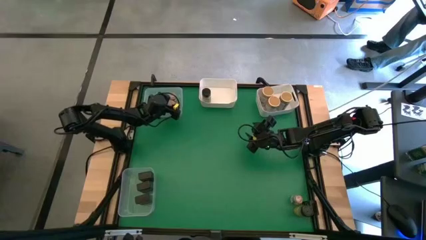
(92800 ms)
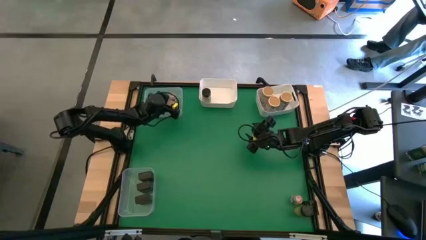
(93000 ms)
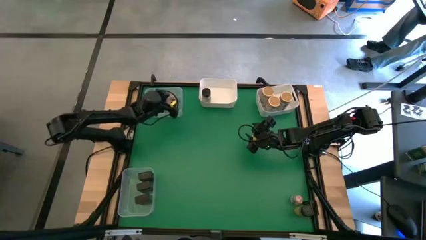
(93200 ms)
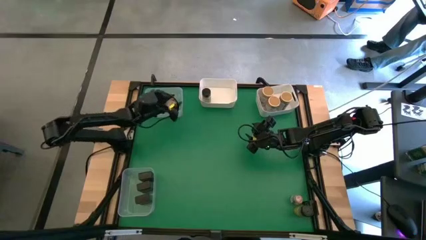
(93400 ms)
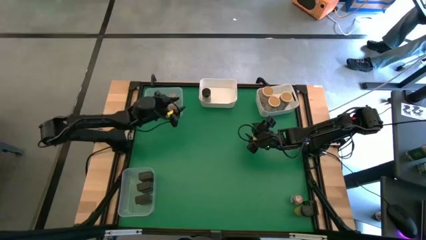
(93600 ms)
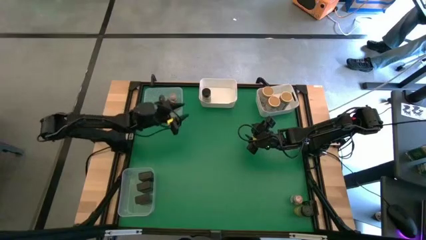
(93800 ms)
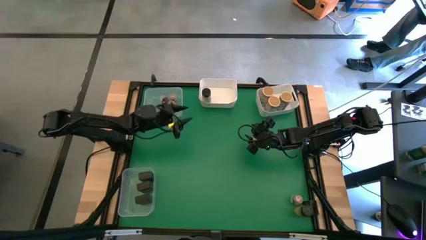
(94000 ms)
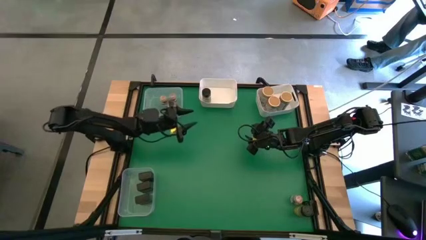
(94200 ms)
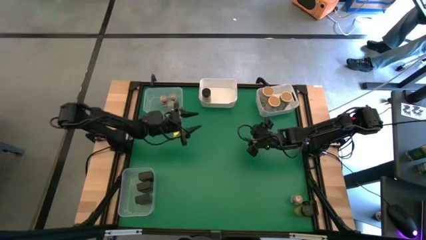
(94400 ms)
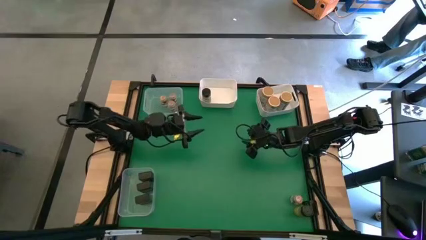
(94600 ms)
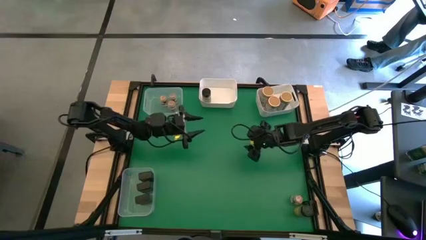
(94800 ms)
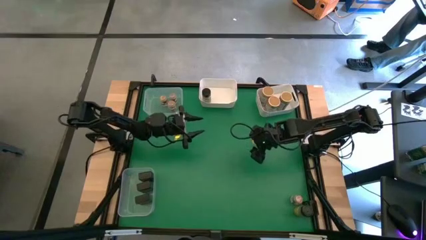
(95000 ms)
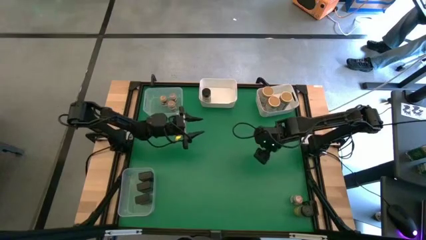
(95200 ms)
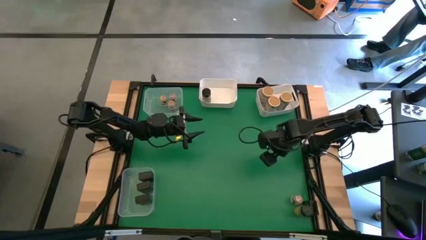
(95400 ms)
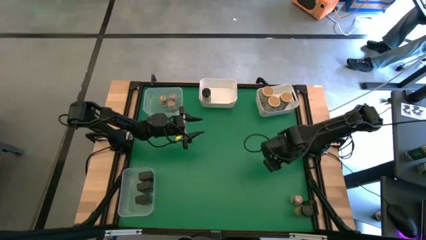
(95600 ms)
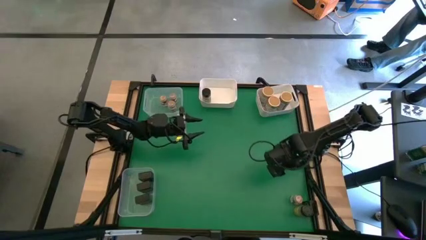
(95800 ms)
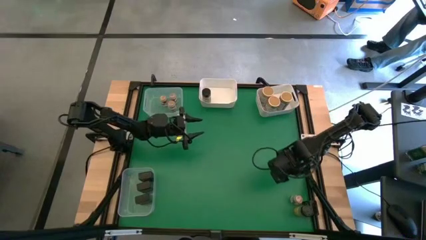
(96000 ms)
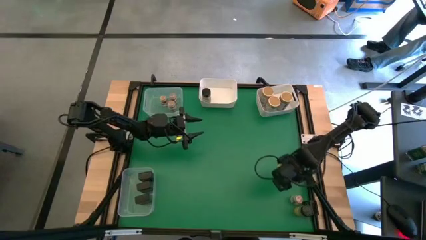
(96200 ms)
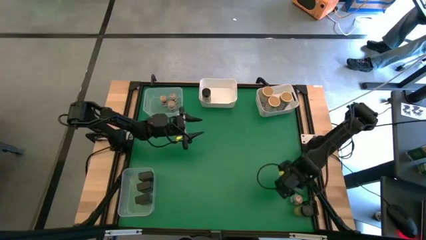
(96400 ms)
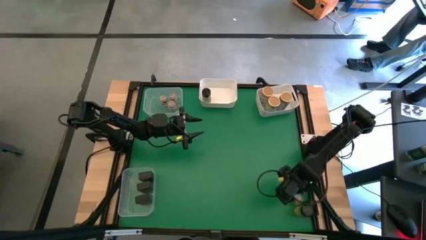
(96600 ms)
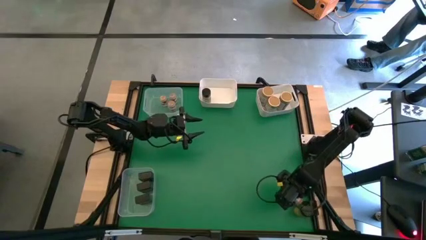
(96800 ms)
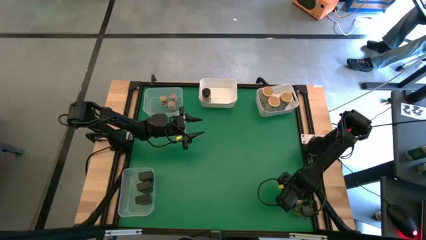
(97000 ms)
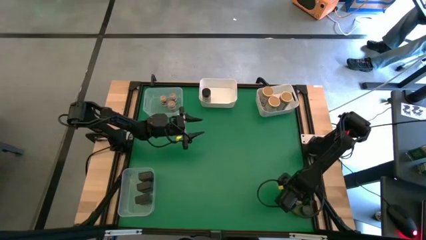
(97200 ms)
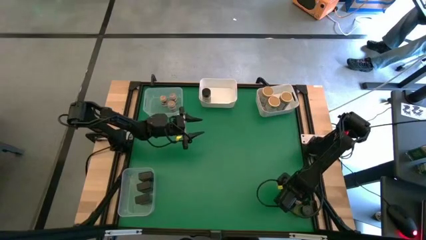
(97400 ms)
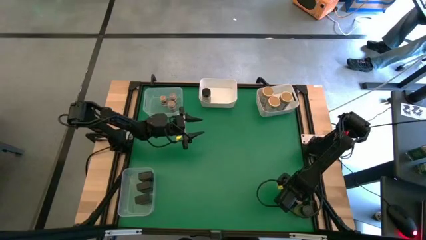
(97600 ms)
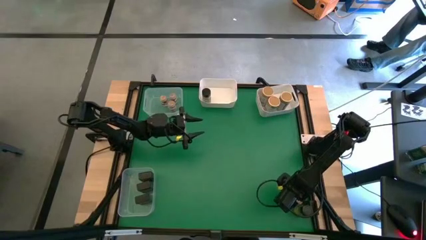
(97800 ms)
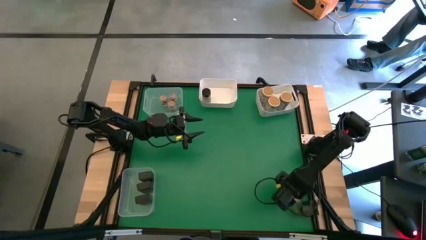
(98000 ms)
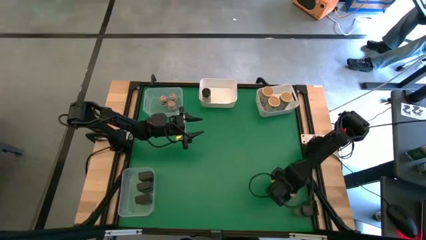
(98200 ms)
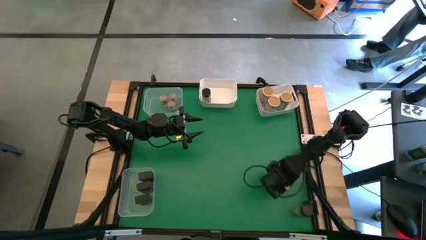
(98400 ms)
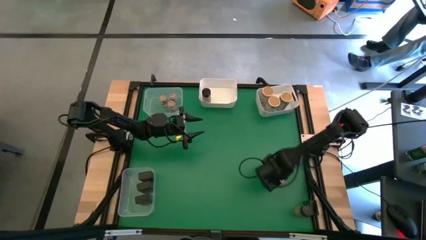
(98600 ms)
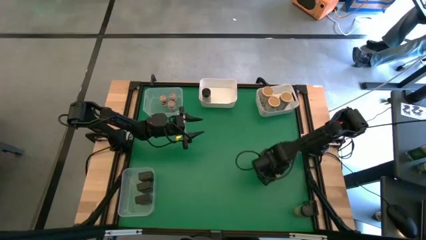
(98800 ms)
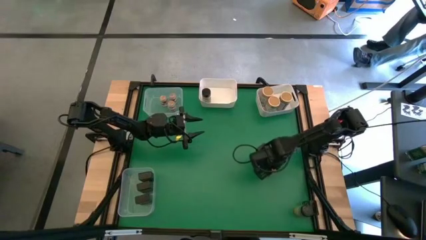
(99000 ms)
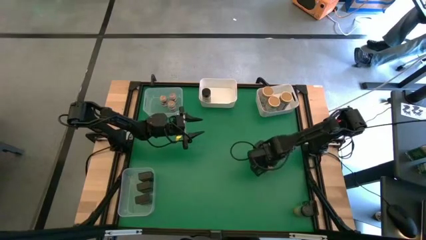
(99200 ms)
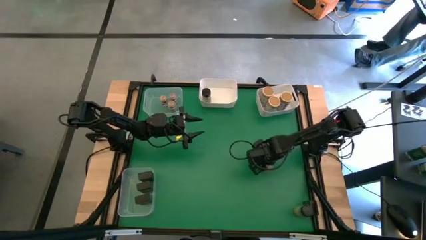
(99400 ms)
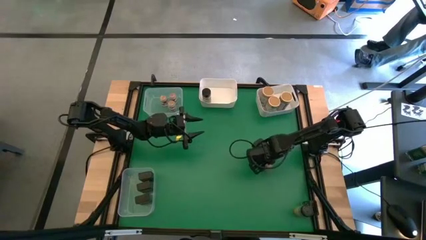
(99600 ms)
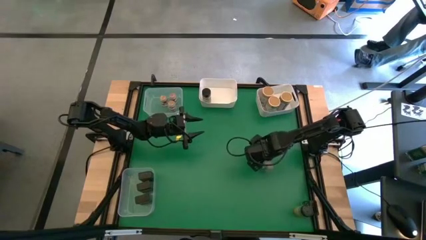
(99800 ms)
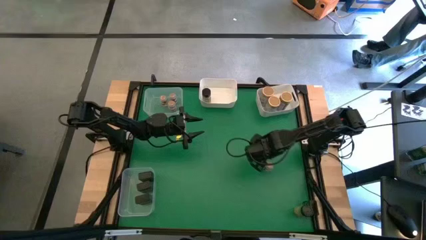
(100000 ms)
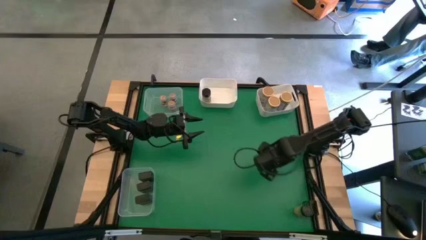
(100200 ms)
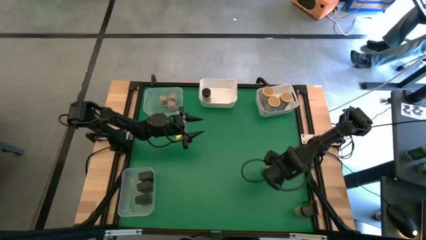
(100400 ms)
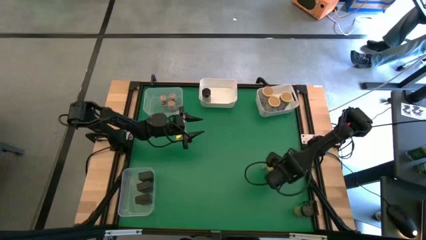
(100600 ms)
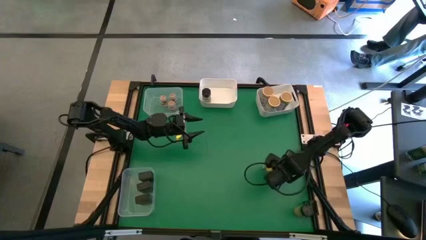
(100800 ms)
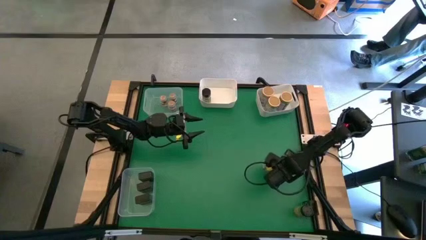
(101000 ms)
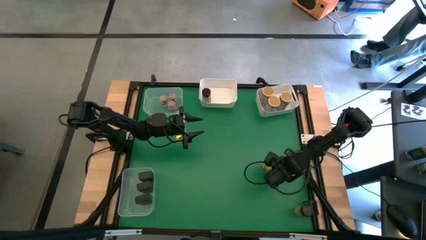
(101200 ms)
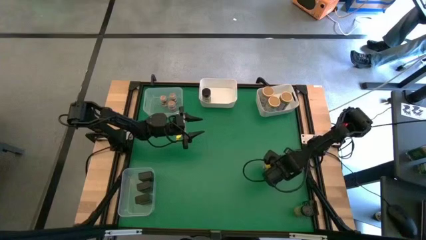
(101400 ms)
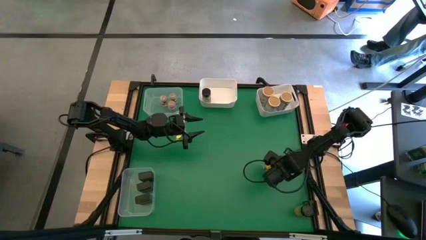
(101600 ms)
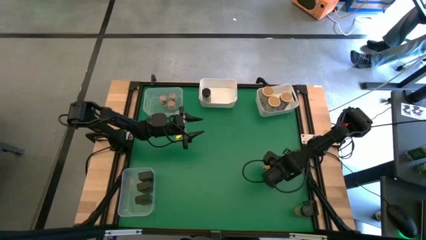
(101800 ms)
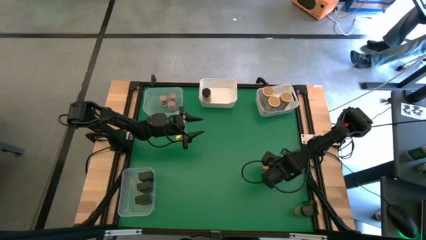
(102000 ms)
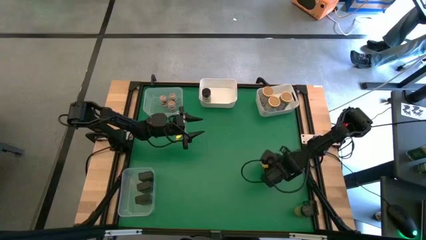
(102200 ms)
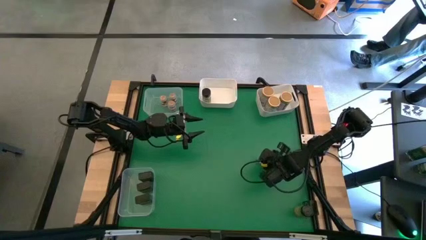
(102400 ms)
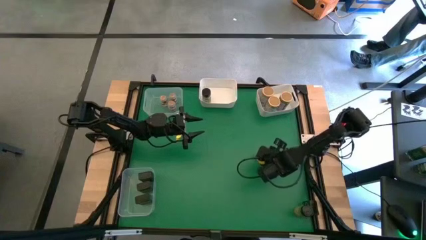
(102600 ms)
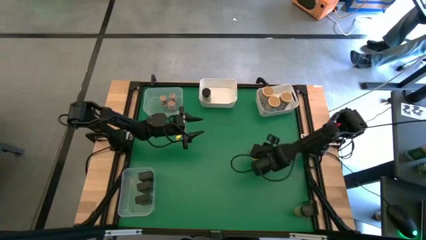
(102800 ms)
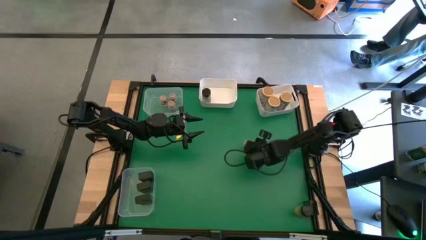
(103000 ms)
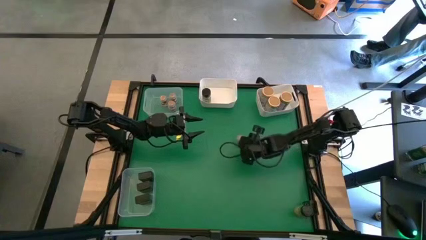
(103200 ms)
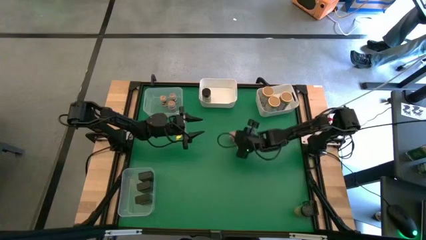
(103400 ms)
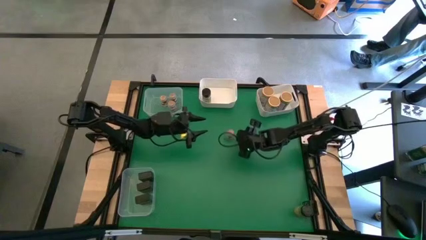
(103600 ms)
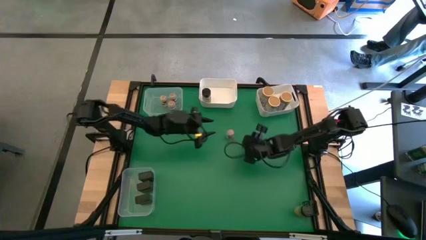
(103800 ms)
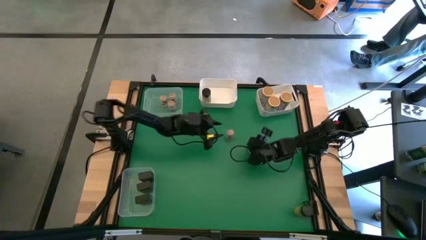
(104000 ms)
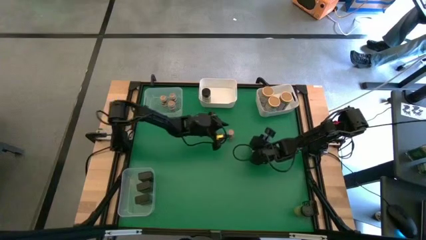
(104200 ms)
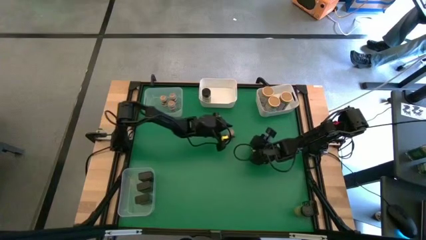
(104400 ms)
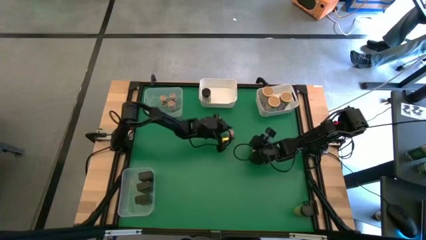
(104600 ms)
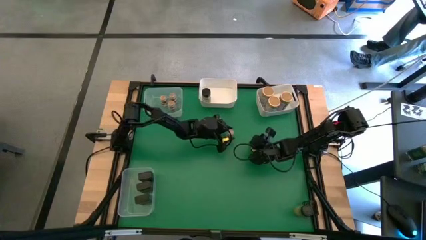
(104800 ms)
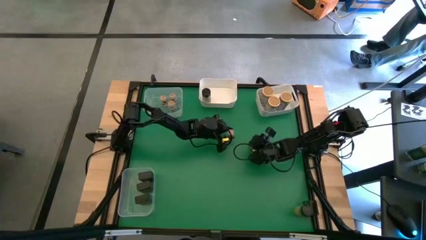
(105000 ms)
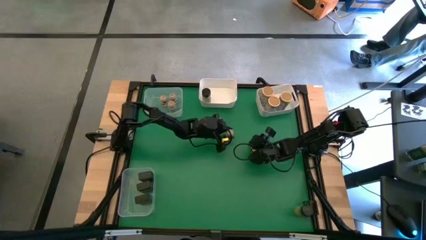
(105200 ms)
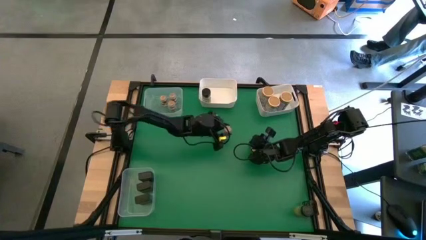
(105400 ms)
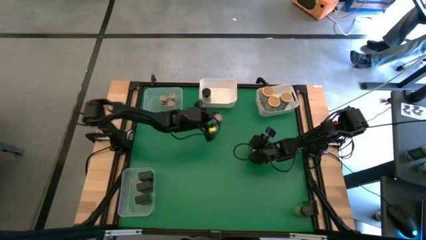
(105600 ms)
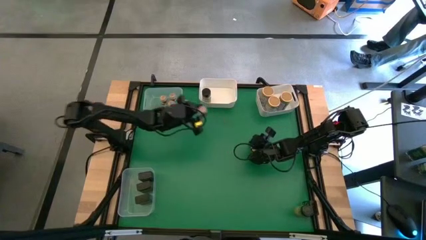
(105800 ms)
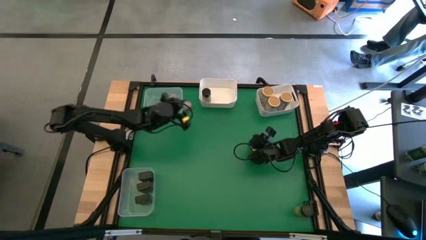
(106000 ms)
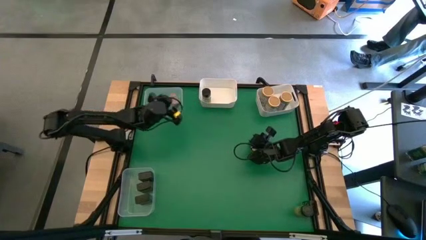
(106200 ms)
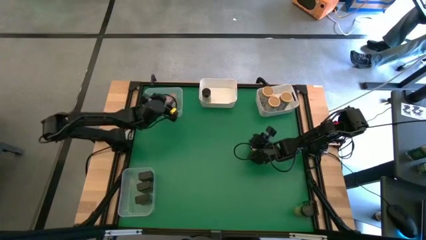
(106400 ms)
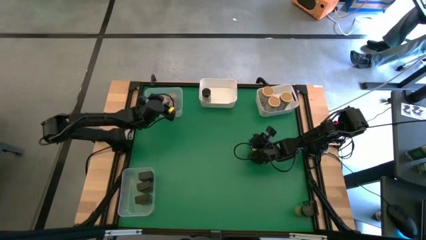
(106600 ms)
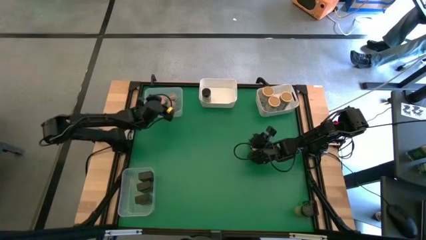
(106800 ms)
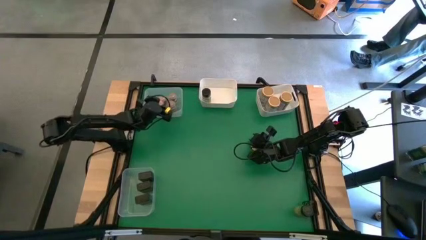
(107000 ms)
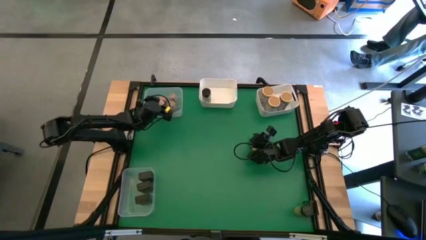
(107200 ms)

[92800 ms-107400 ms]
Task: Sort spices by type
Put the small brown seasoning bottle into the top transparent bin

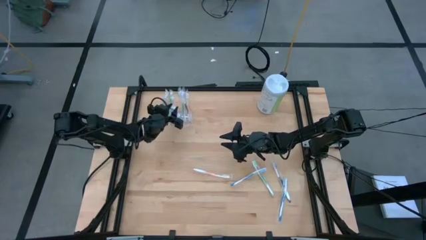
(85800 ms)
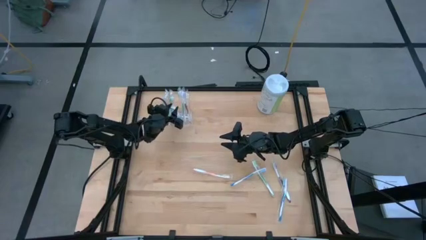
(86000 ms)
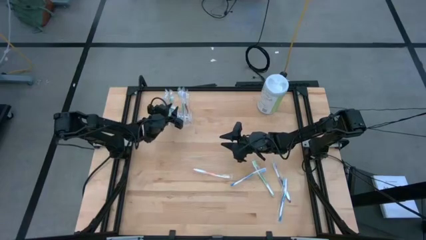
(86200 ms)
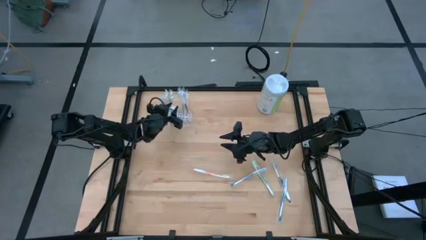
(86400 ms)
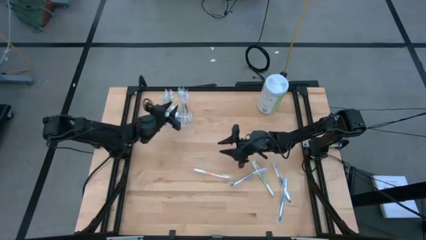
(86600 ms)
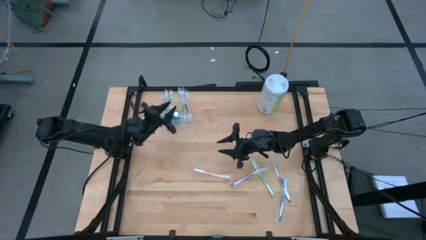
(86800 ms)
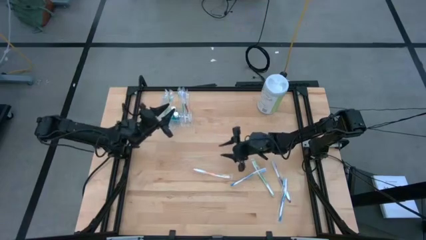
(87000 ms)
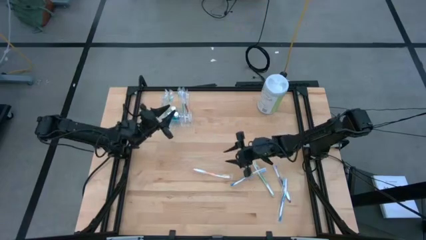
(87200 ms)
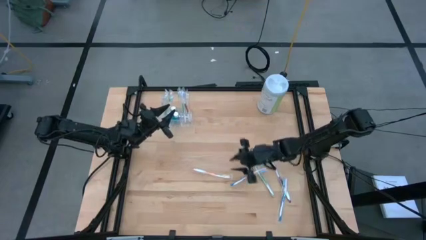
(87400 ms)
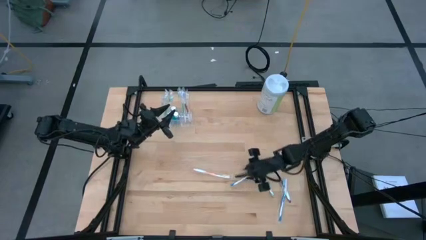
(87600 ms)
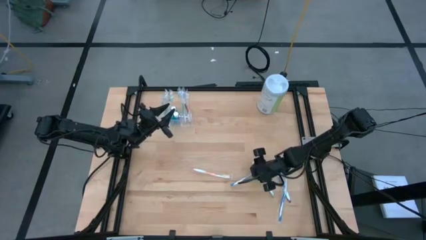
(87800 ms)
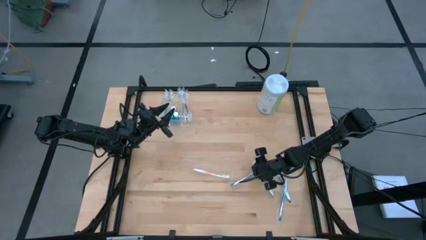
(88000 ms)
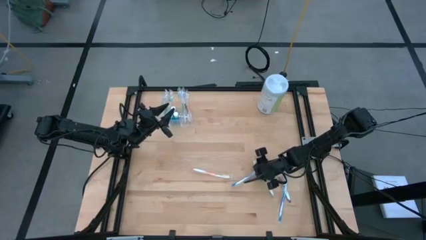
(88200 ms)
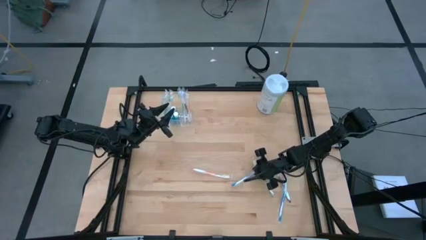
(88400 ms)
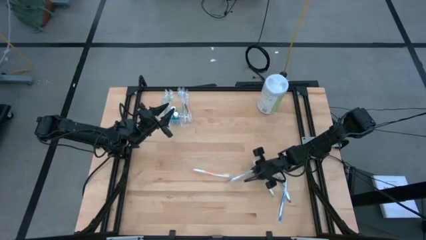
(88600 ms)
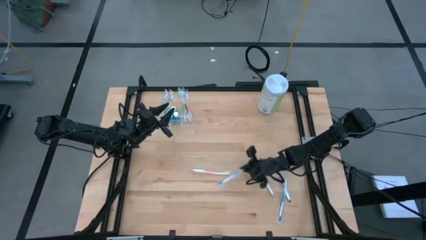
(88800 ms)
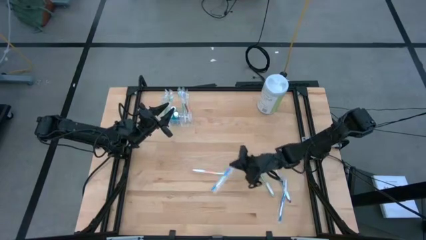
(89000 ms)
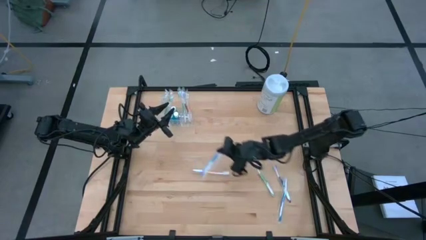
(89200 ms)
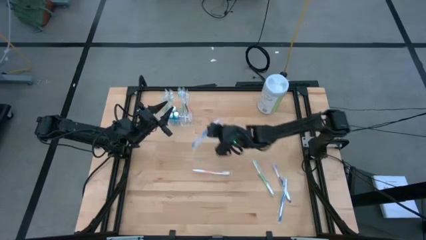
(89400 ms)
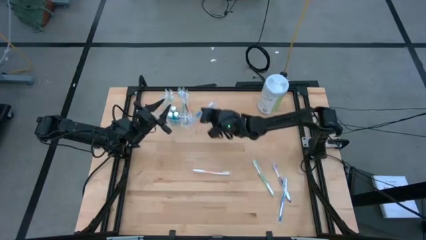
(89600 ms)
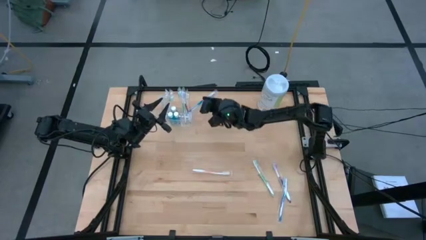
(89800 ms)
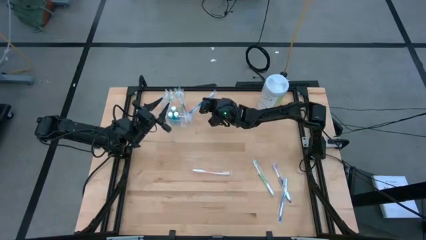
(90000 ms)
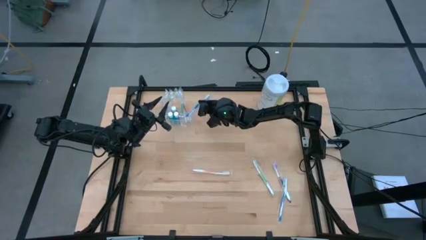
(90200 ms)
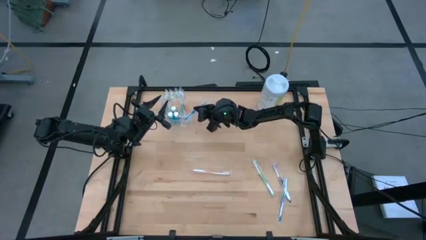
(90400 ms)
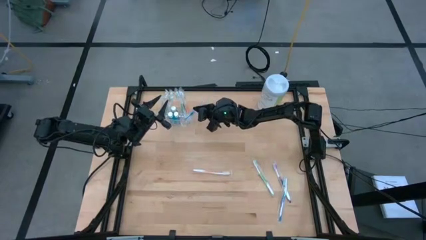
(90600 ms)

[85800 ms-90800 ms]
Task: Pick & Place toothbrushing station
Put the blue toothbrush into the transparent organizer
